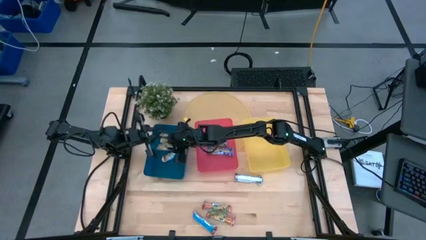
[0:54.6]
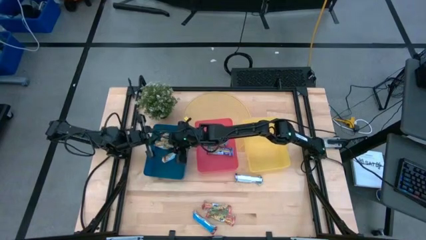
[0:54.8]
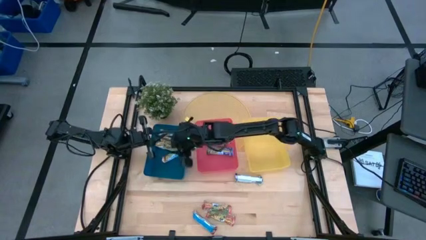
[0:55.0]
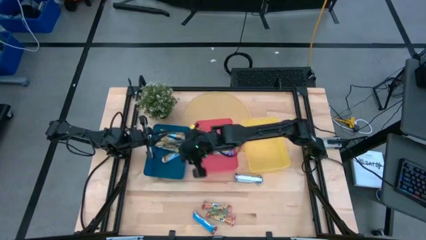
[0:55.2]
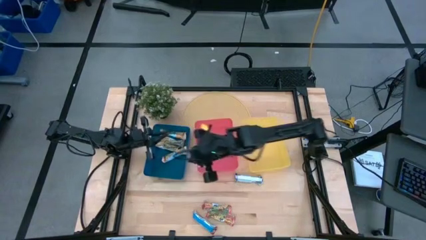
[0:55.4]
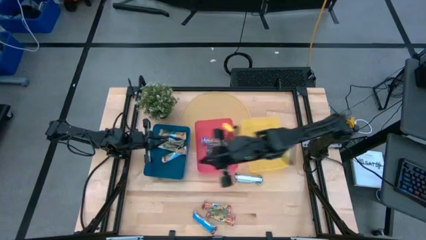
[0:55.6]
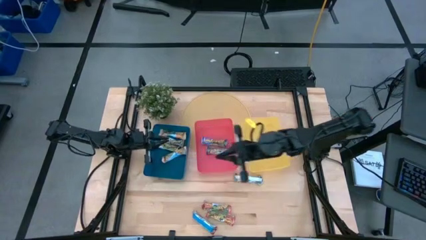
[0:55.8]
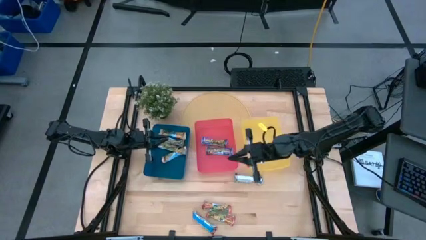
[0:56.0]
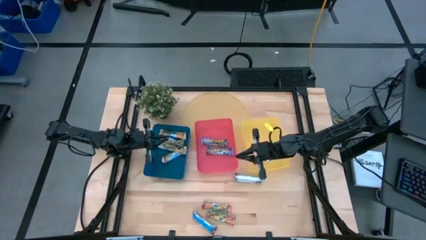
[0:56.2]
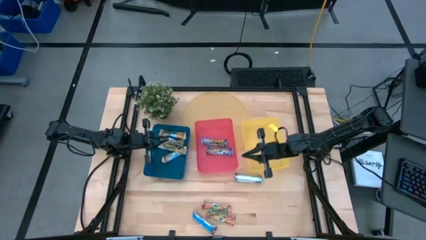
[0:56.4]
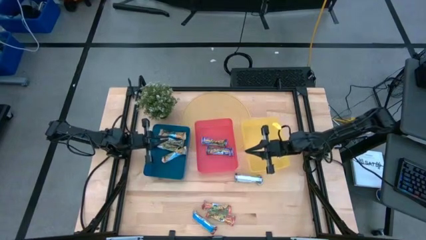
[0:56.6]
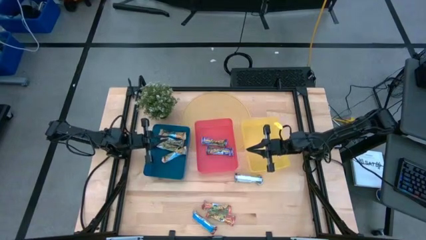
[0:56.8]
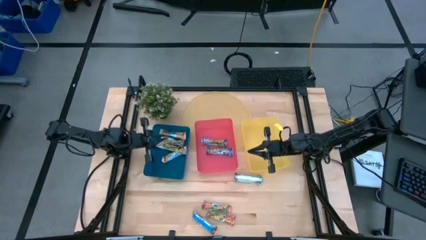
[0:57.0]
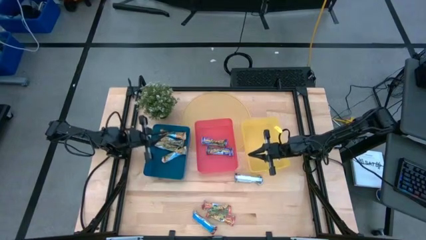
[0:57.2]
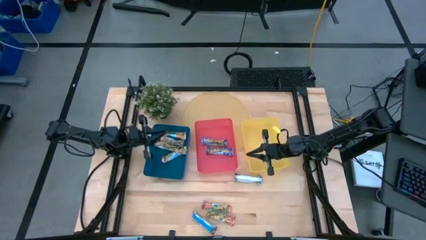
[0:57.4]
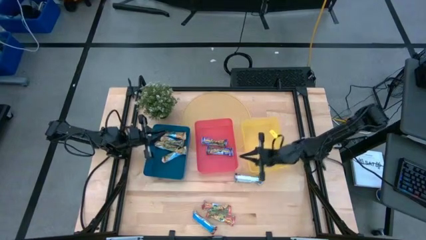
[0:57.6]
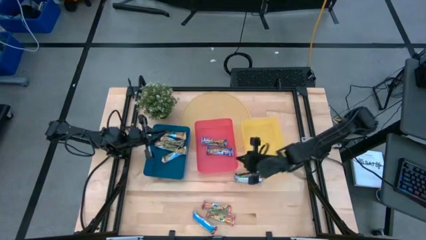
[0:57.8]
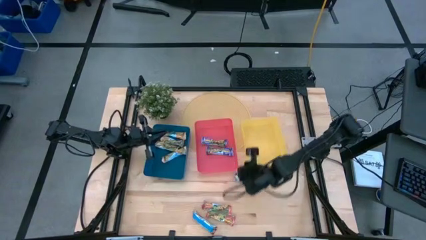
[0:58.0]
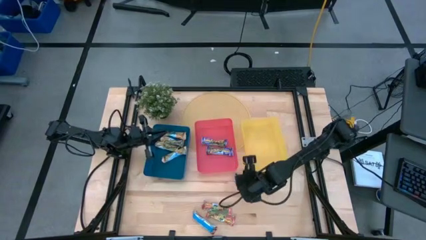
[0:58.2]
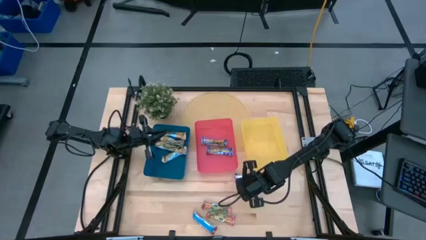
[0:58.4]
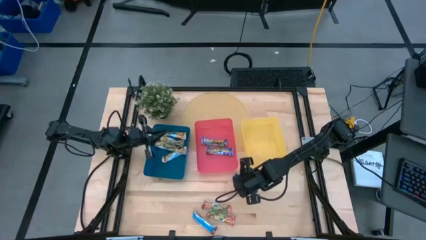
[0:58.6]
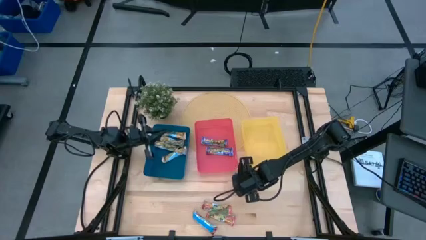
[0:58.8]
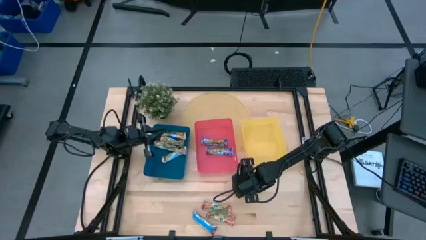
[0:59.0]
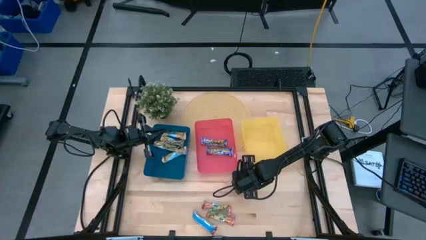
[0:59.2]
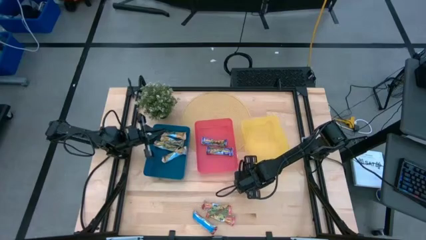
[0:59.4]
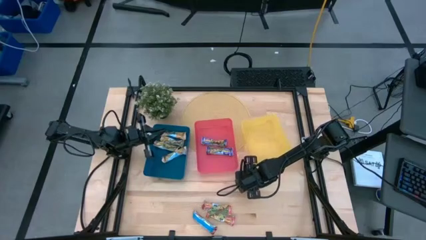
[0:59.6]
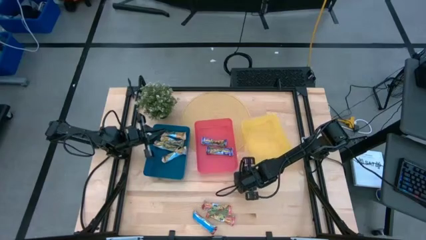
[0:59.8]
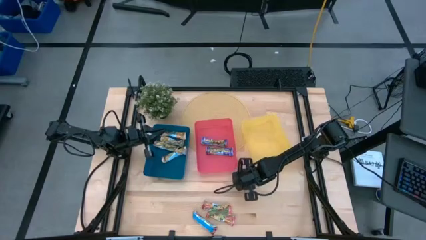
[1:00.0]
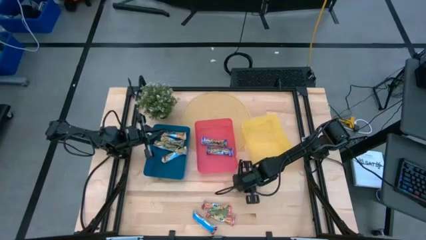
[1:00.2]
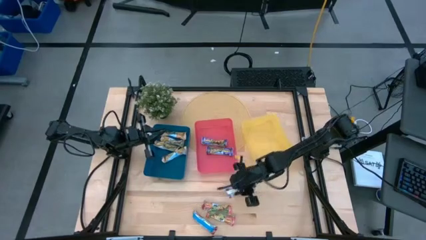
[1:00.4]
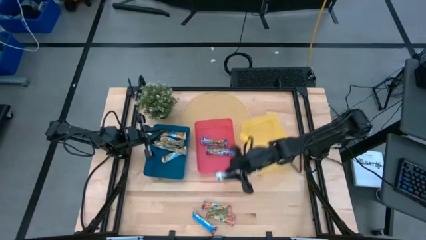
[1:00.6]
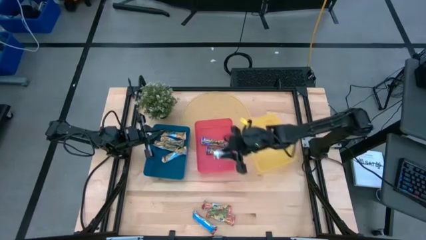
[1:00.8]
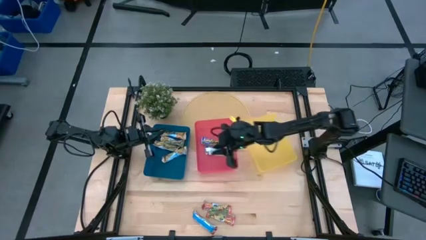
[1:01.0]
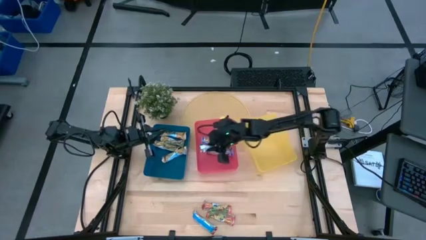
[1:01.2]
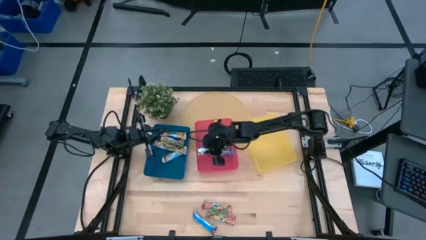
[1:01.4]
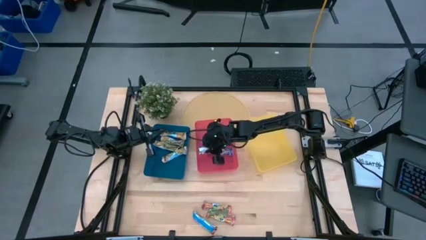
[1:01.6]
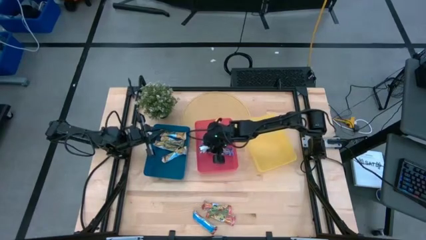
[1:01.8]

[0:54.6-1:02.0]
Task: Pick and place Granola Bars by type
Put the blue granola bar into the red bin

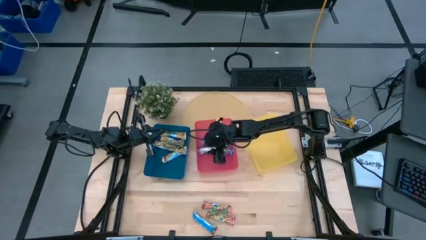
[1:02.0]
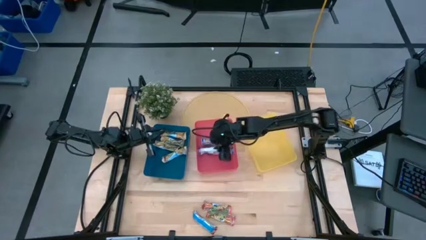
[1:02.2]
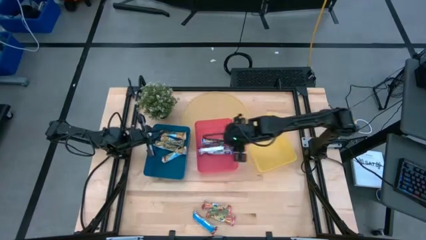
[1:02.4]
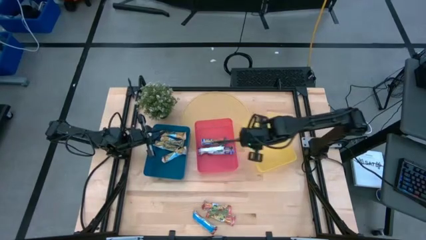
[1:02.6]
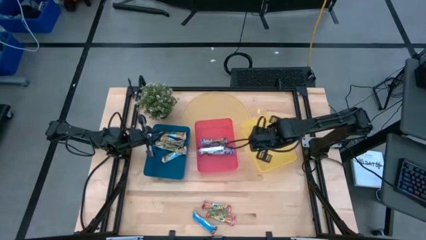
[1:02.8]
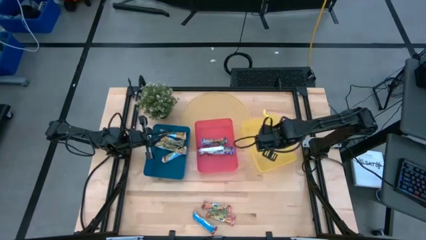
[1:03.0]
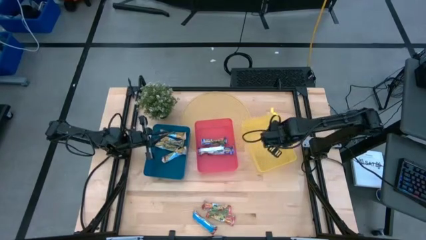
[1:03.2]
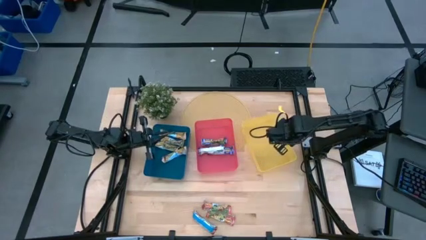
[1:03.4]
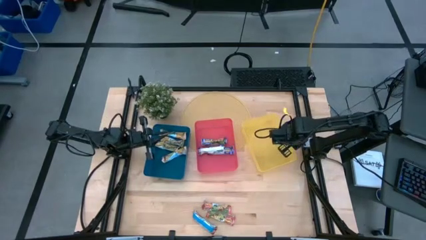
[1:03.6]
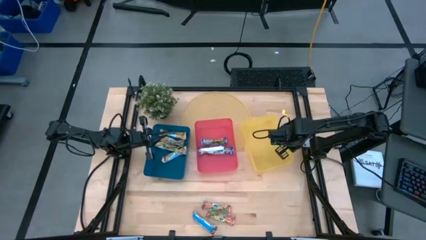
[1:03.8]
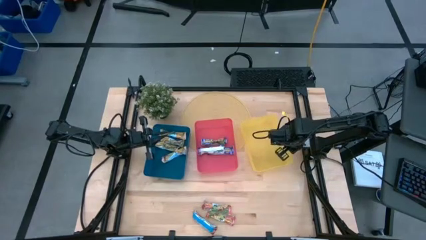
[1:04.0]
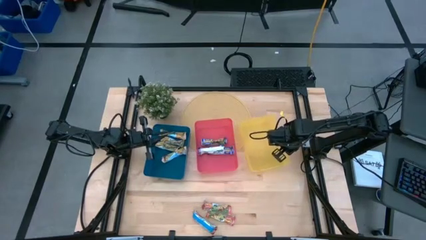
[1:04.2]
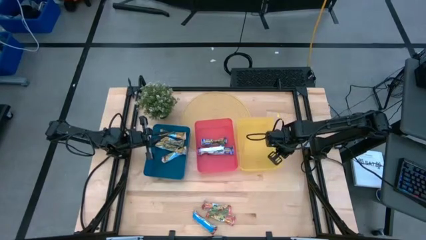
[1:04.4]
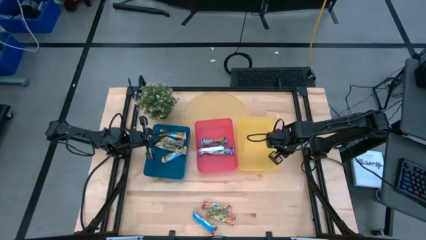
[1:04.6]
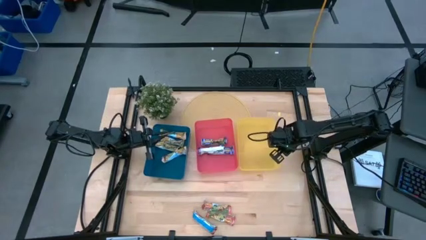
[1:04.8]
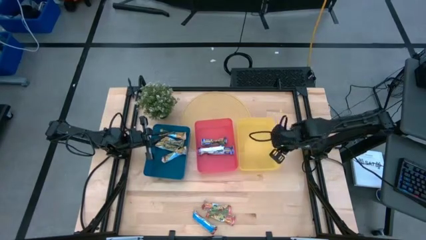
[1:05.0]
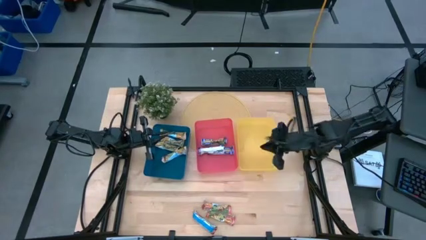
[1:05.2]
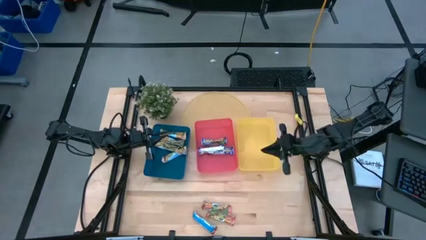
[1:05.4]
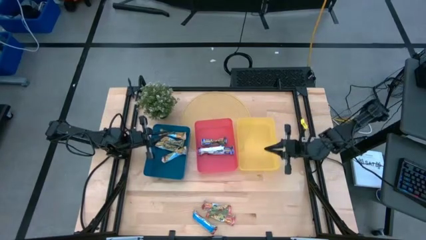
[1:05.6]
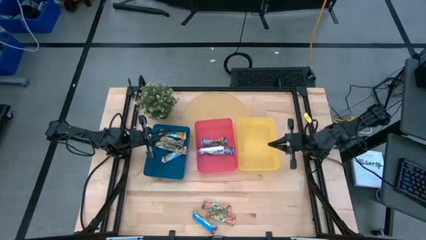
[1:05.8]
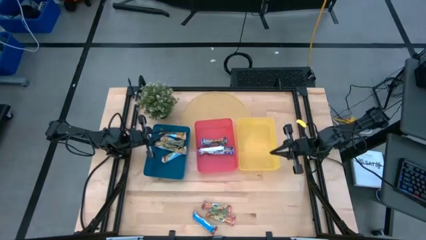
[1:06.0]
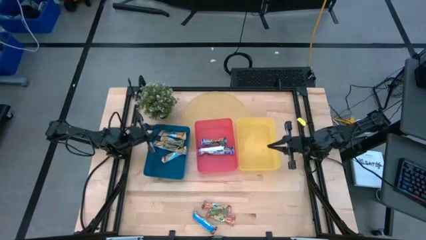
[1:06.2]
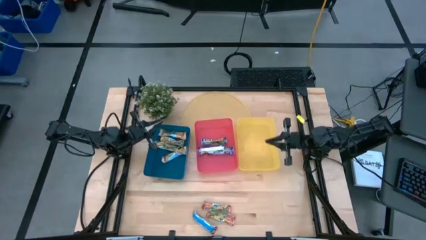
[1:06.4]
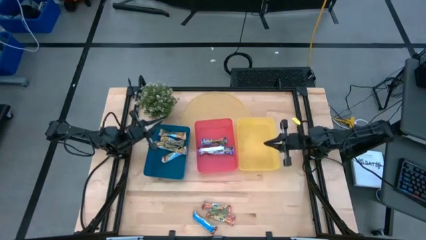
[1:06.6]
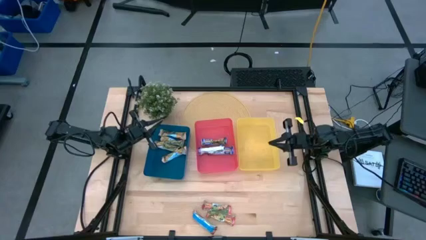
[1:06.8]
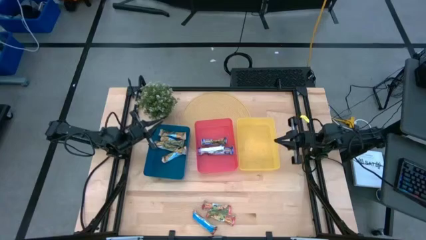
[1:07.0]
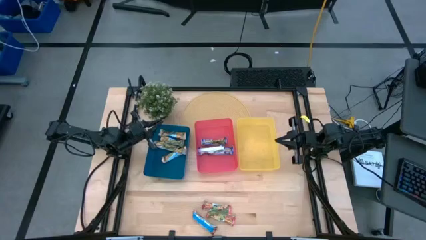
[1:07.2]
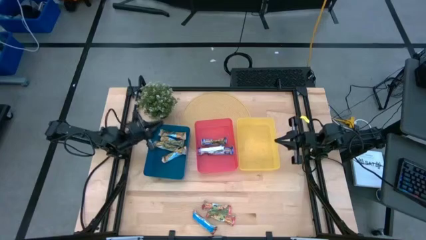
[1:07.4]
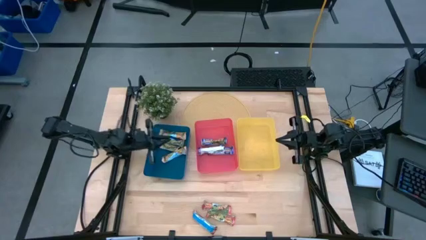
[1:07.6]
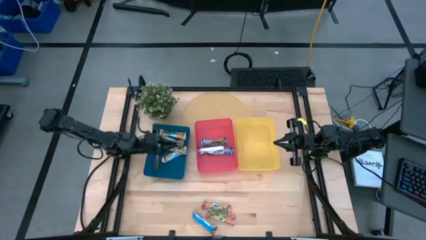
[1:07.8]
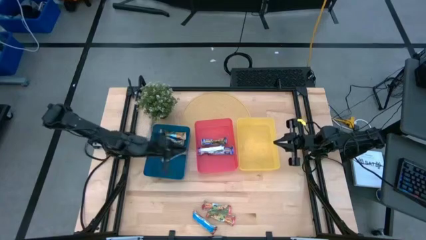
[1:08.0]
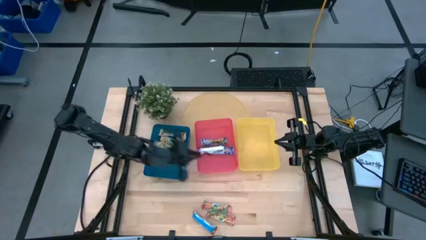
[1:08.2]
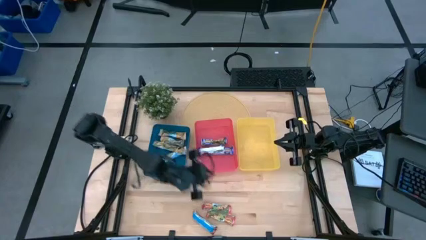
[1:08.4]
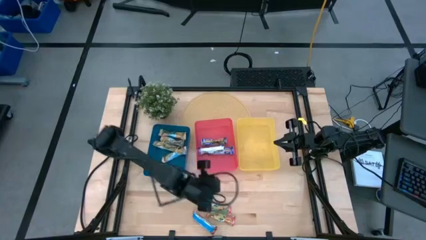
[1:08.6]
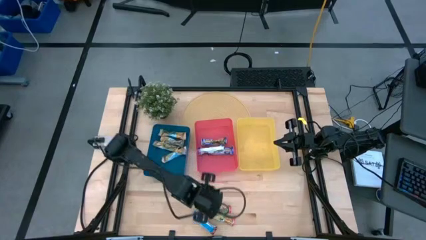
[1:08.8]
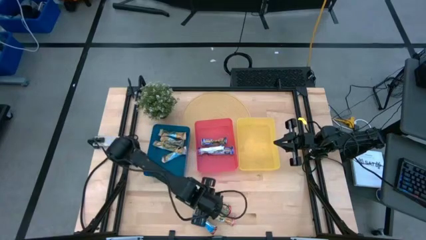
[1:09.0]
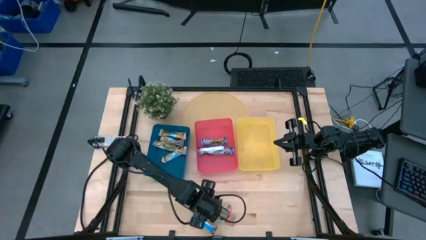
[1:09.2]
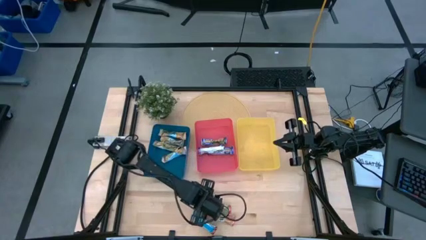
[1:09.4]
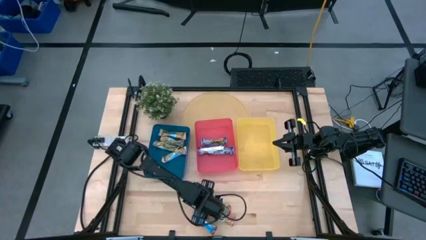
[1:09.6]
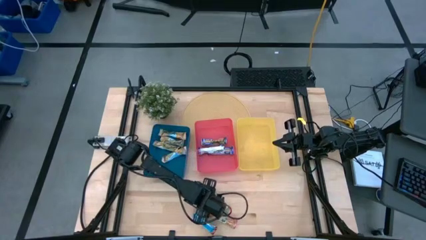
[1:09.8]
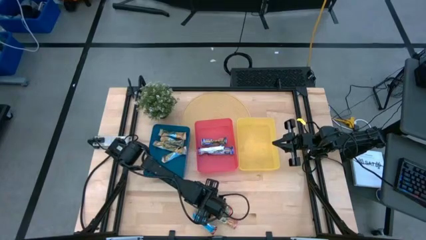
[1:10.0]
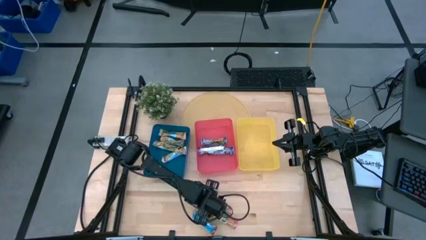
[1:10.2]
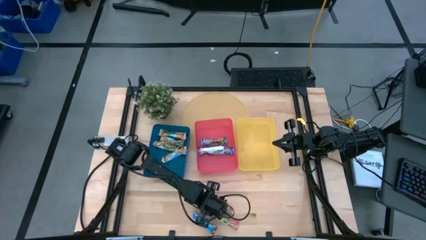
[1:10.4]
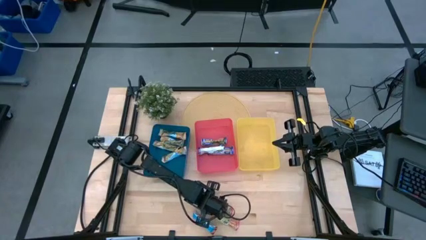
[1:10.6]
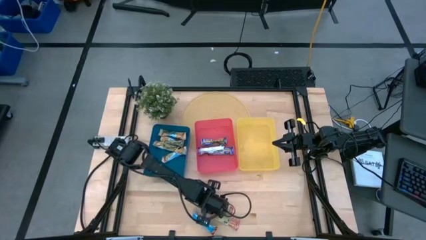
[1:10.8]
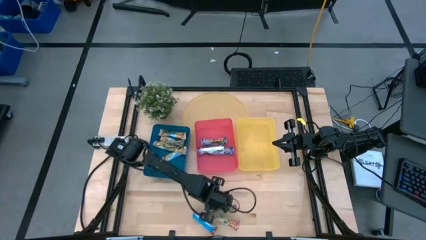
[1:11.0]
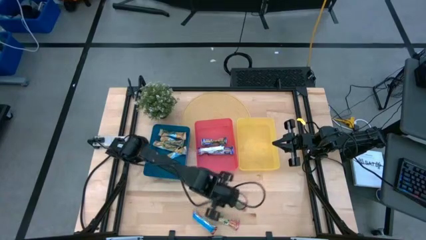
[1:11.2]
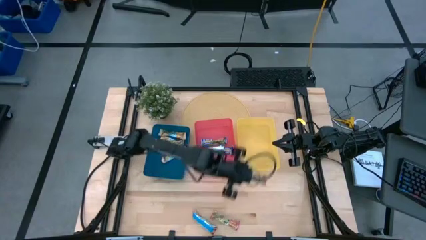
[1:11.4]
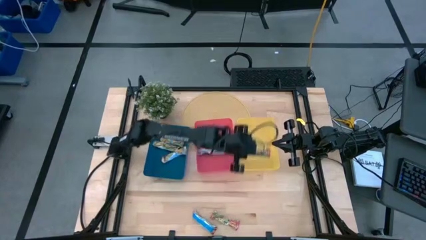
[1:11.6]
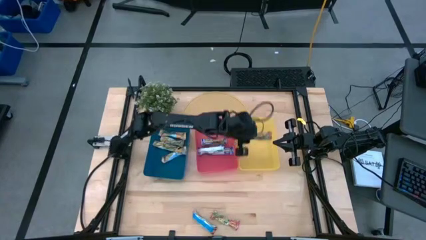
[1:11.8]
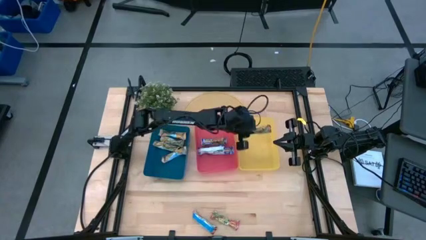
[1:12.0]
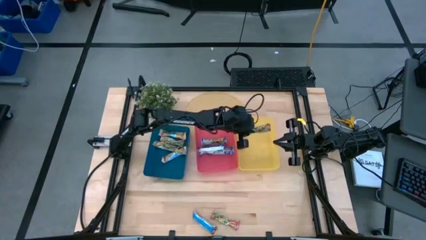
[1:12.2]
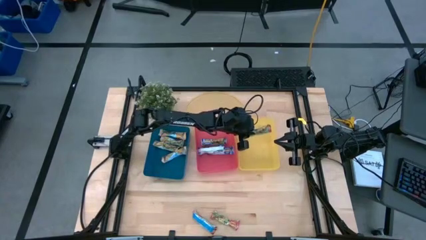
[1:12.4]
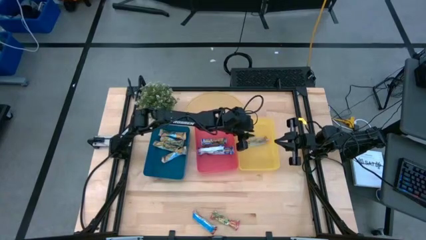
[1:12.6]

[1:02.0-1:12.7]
Put the red granola bar into the yellow bin
